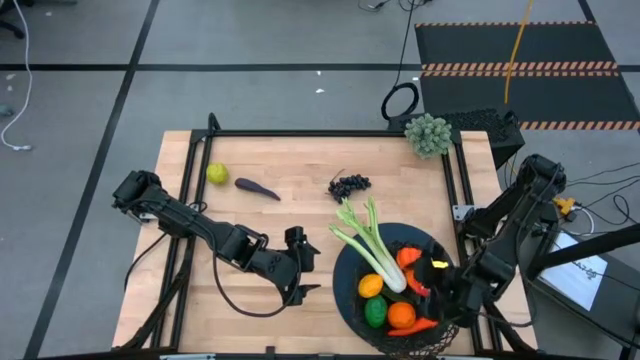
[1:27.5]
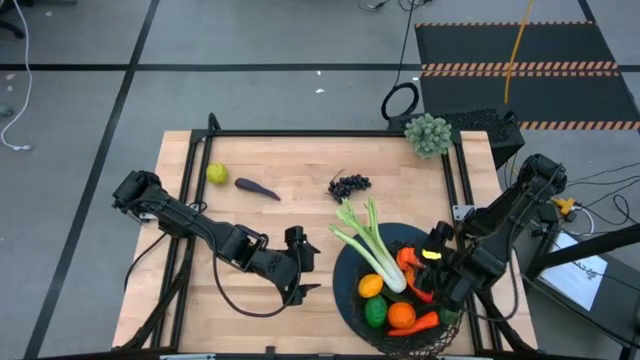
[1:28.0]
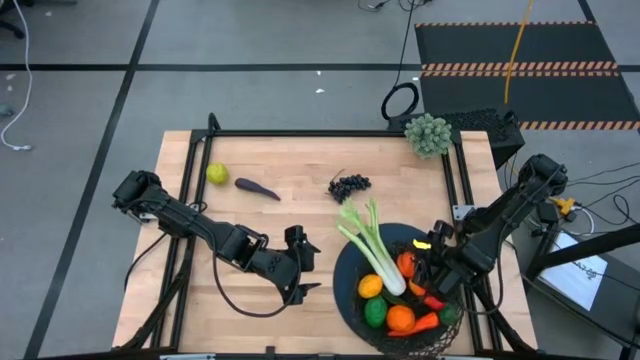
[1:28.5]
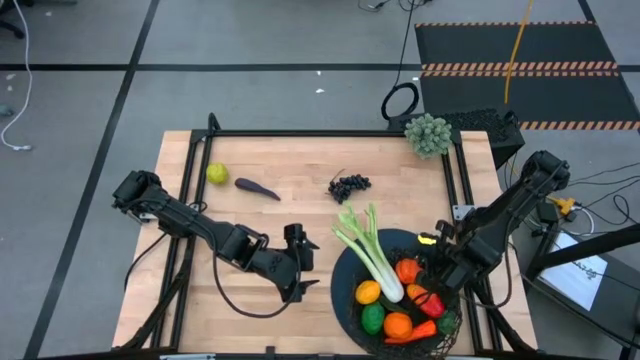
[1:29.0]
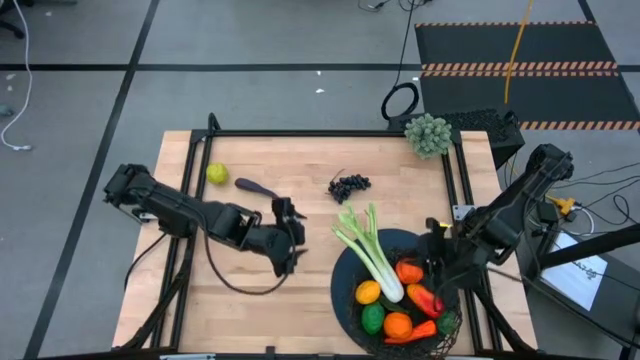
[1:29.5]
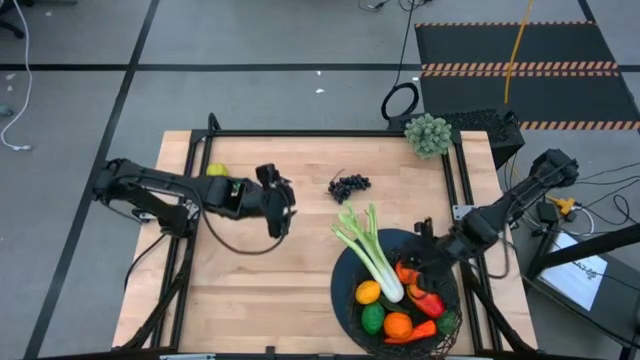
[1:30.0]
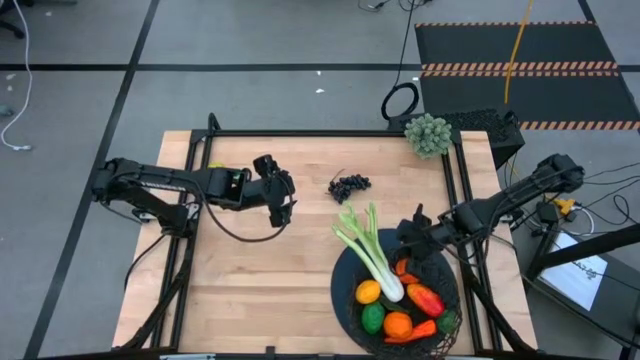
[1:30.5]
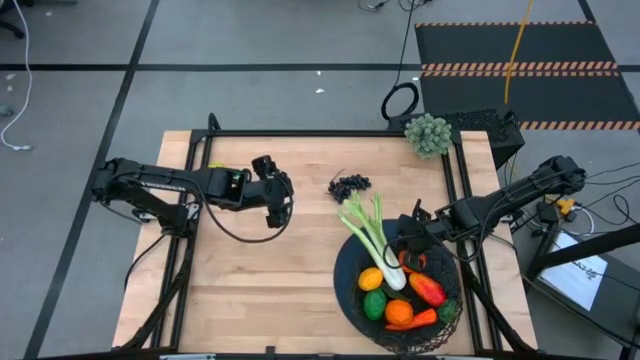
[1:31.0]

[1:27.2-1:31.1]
Task: Build produce basket
Adjust the wire basket

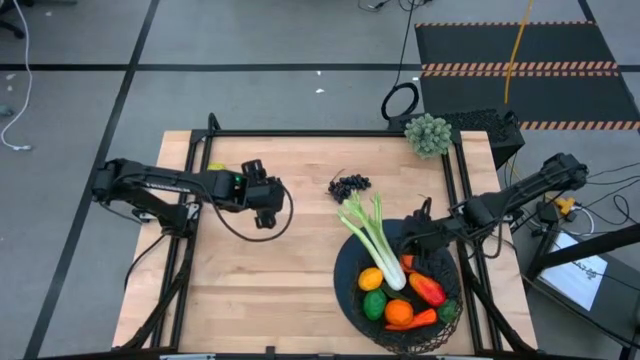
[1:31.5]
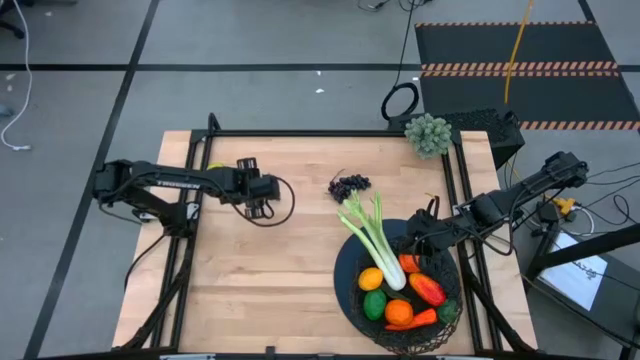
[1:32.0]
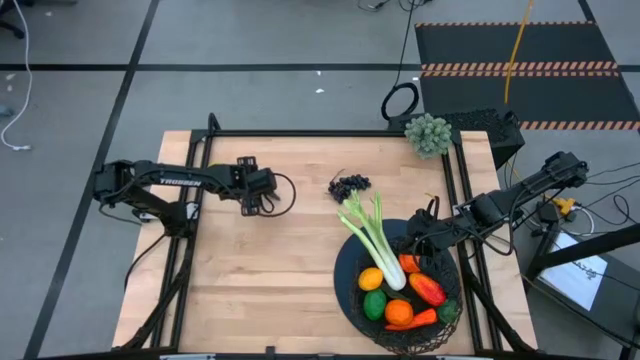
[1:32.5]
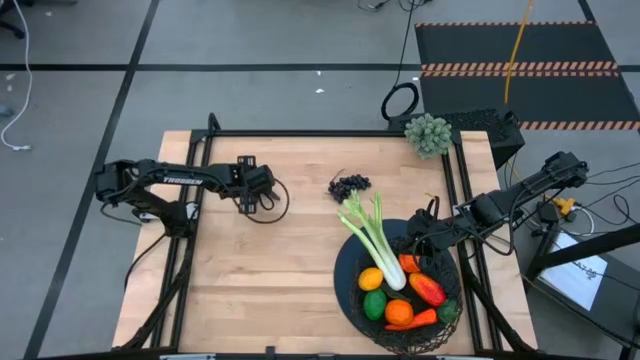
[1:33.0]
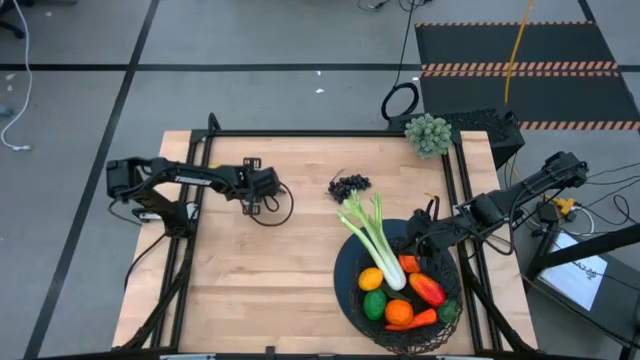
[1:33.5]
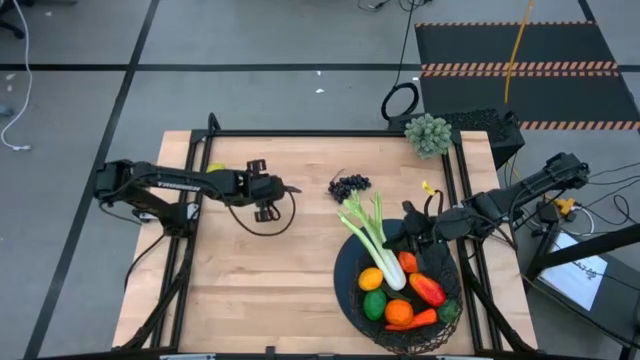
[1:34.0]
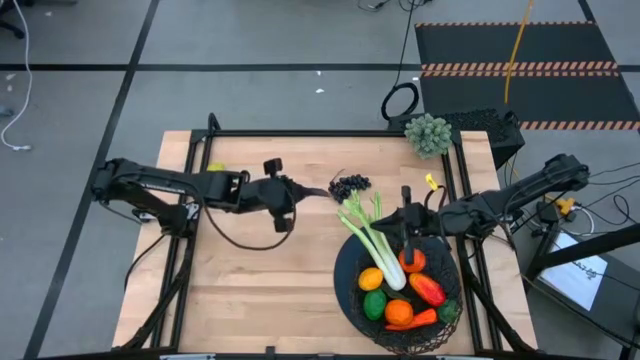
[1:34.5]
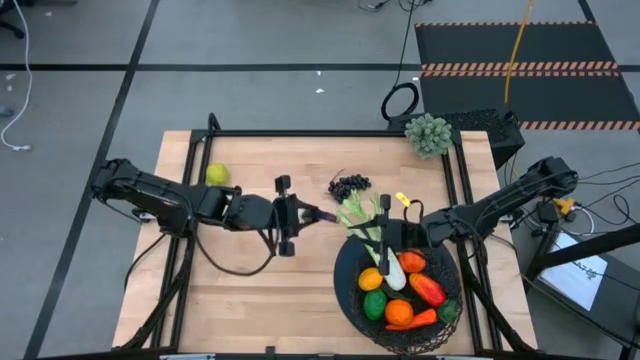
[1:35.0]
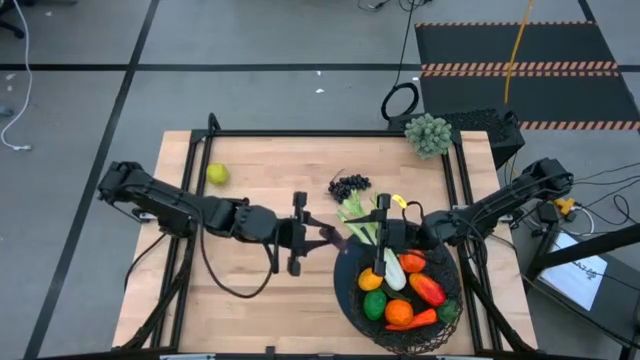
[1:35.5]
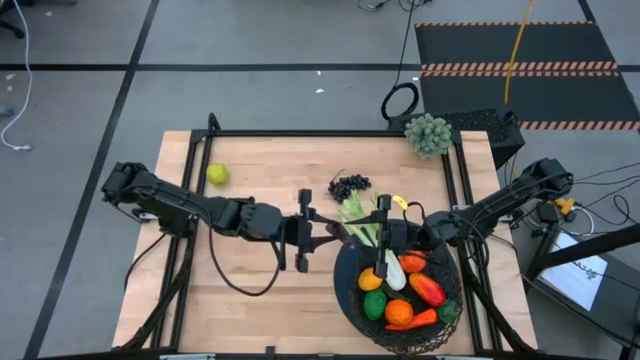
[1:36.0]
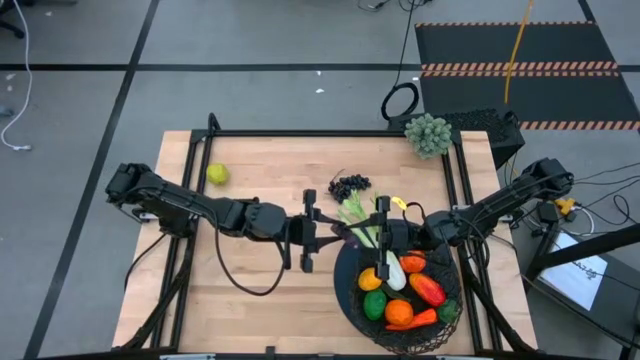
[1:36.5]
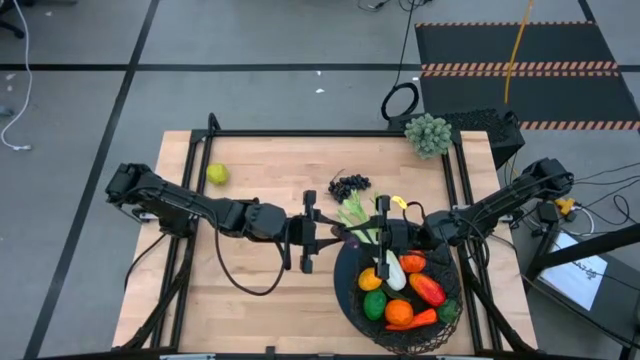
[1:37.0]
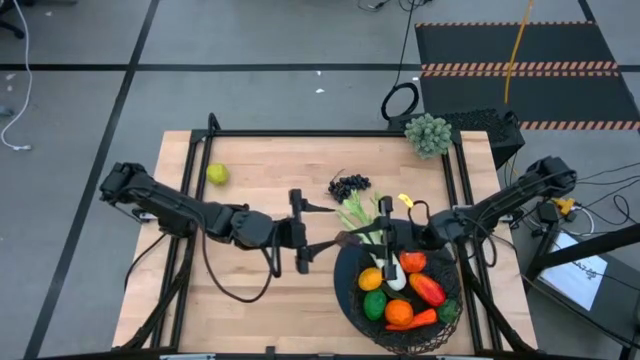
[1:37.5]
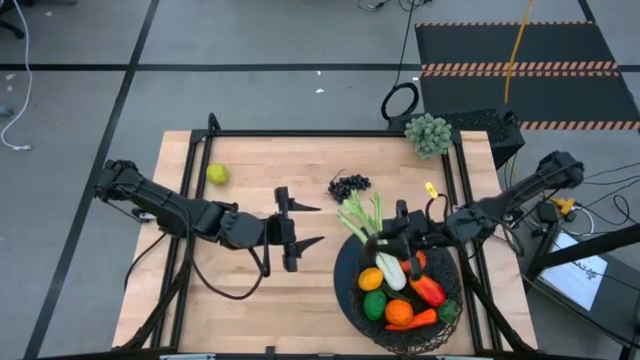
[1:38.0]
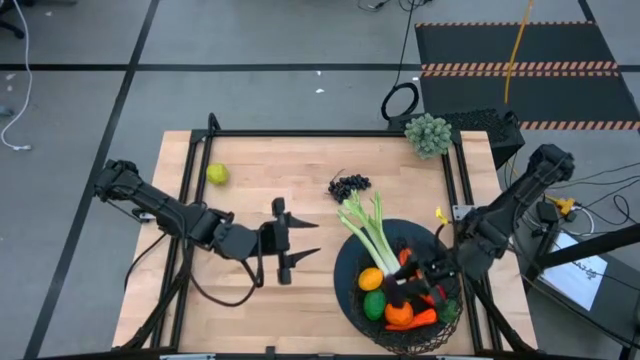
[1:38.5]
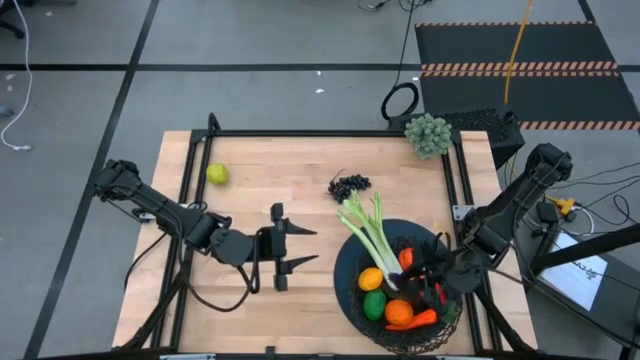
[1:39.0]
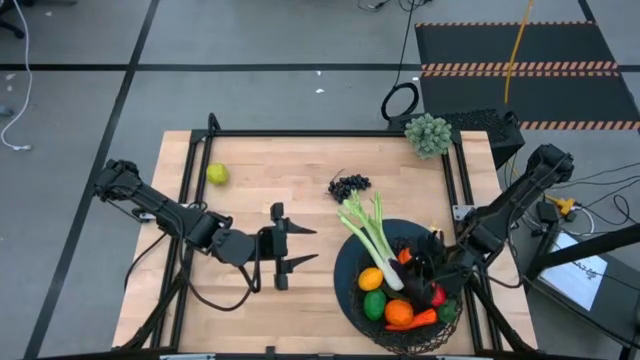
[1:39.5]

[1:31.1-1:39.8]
Put the eggplant into the wire basket

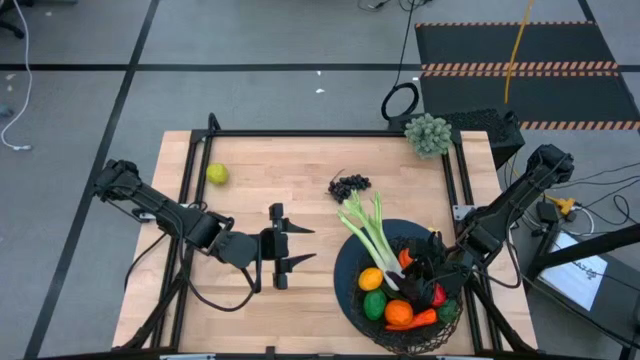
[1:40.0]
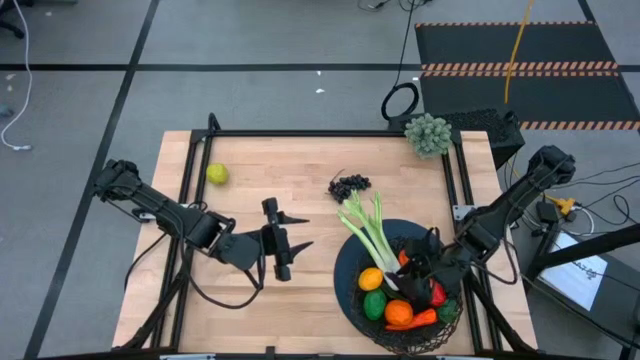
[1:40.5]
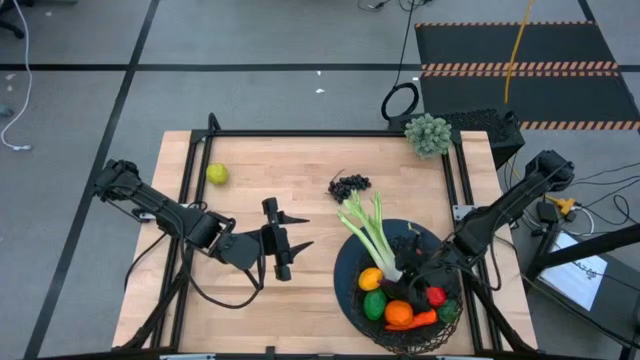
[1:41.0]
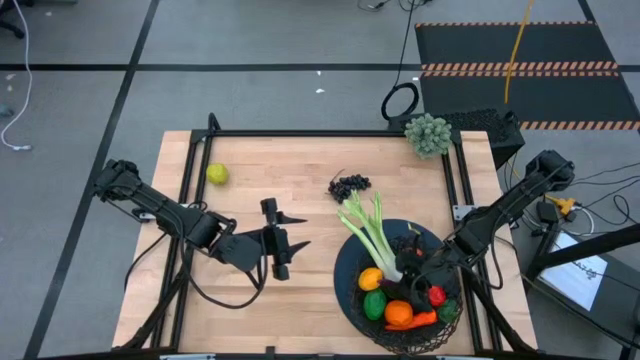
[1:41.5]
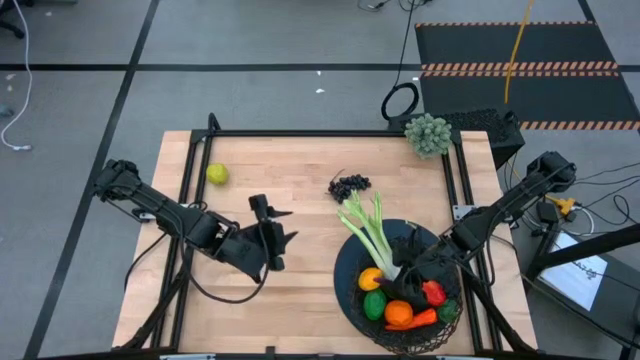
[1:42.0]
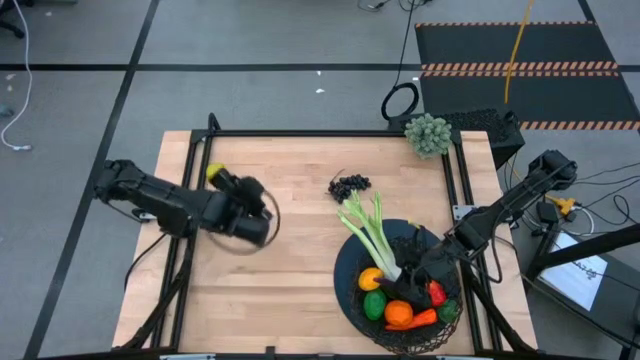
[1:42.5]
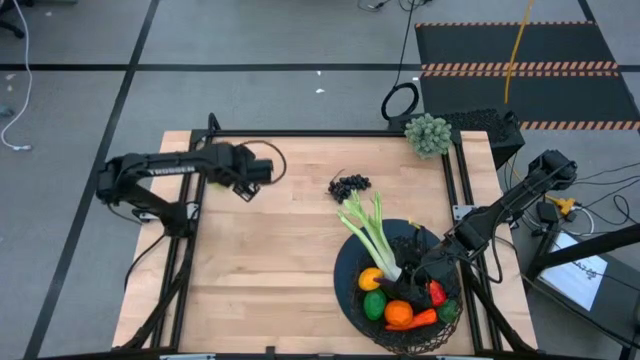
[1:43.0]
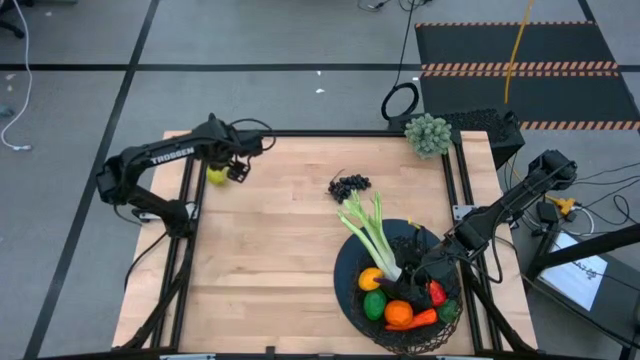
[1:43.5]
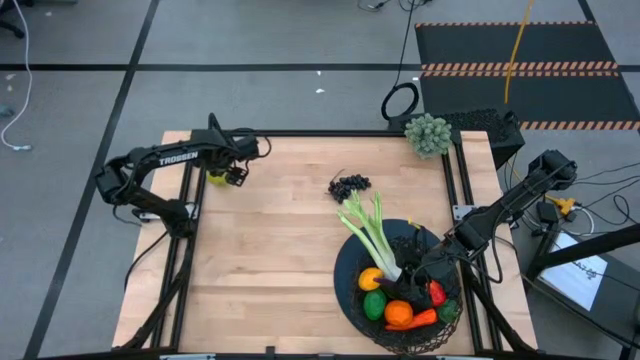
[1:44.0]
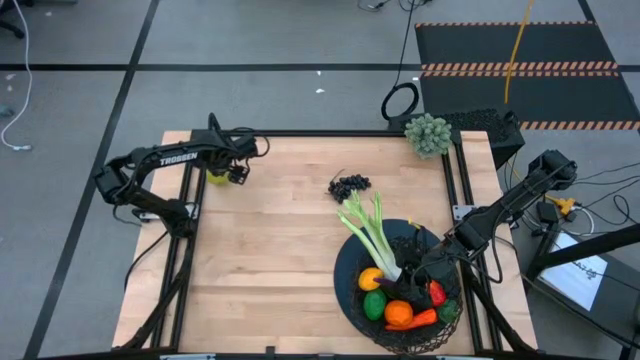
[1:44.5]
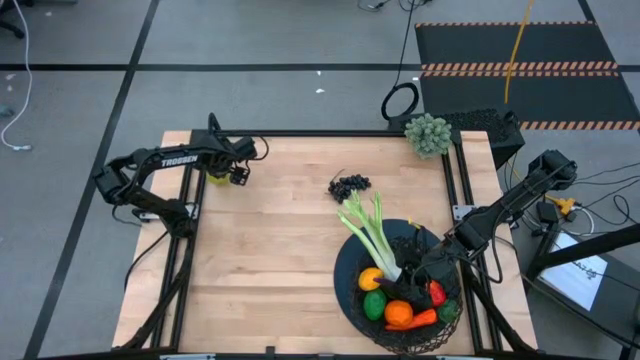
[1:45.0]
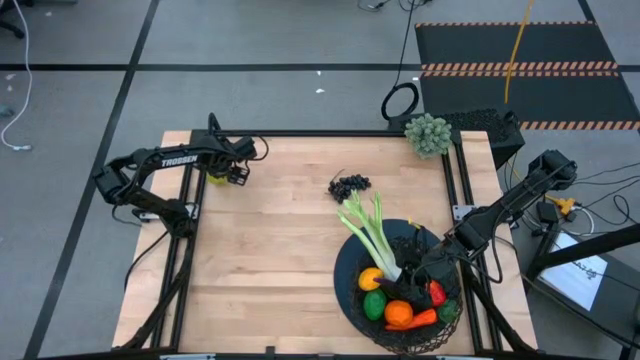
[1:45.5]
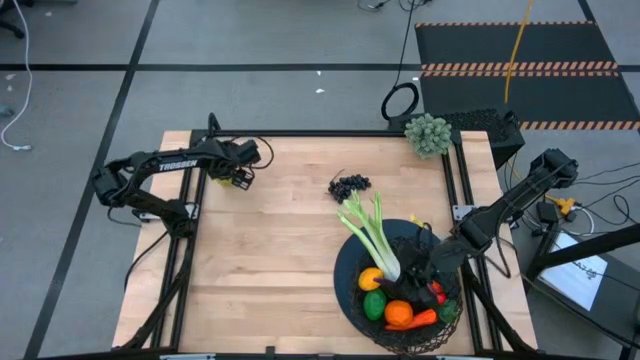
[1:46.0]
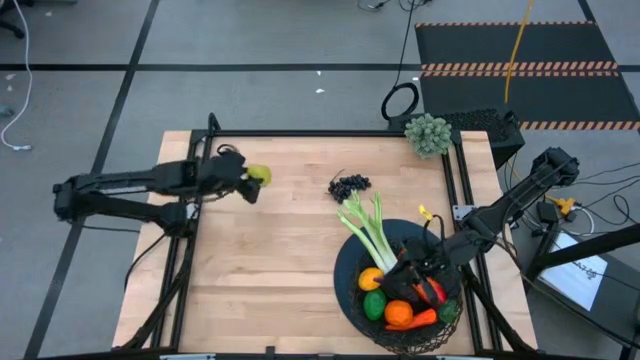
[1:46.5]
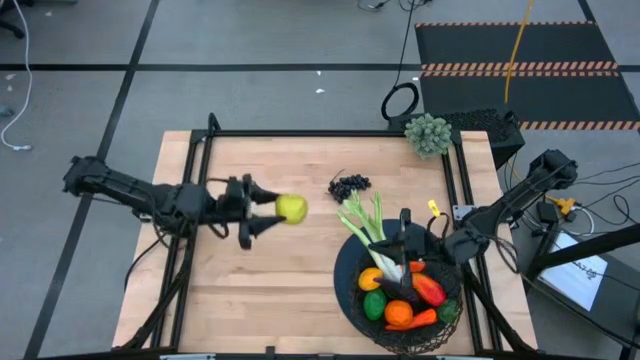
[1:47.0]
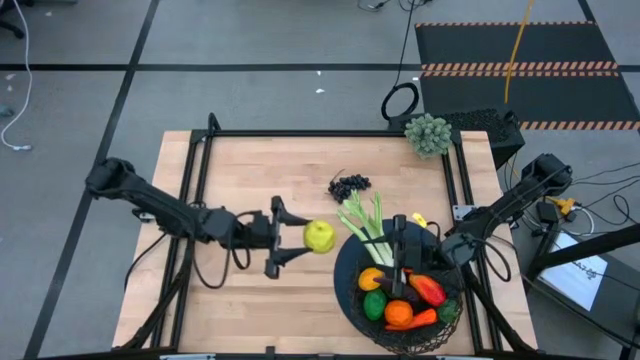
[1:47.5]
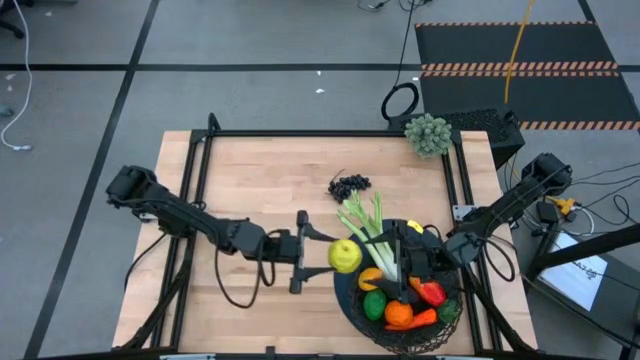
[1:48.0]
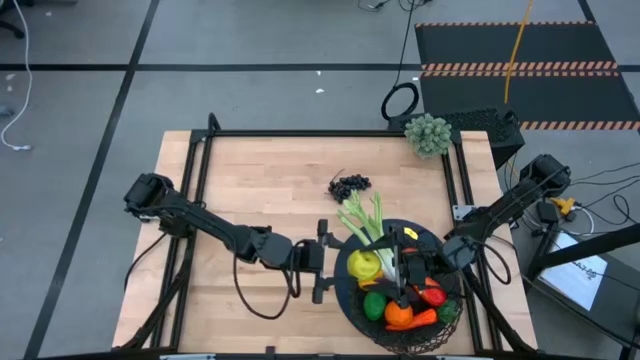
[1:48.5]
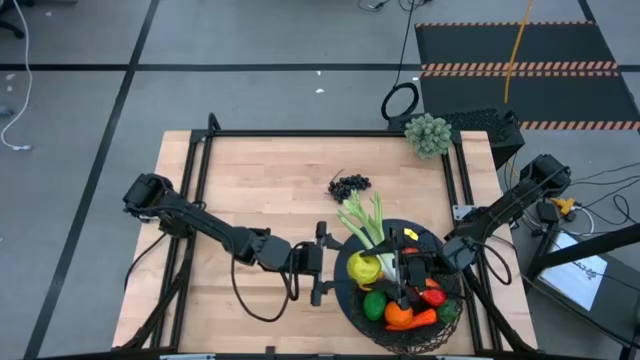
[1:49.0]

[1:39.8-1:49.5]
Put the green apple into the wire basket
